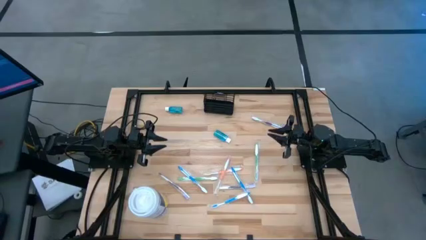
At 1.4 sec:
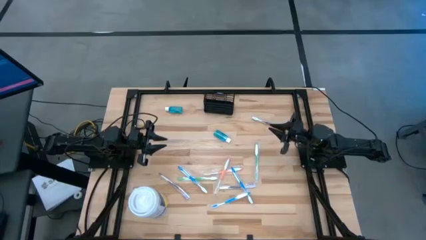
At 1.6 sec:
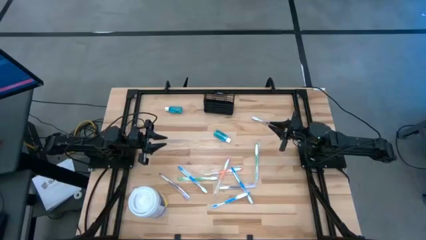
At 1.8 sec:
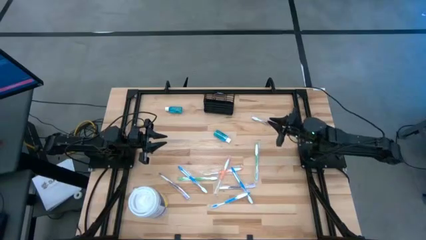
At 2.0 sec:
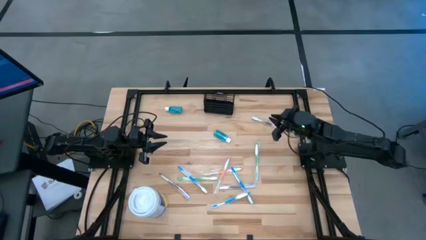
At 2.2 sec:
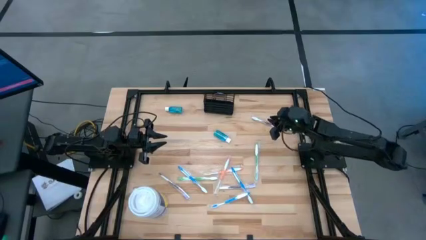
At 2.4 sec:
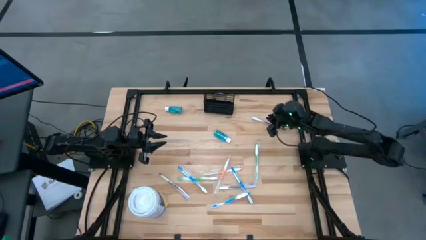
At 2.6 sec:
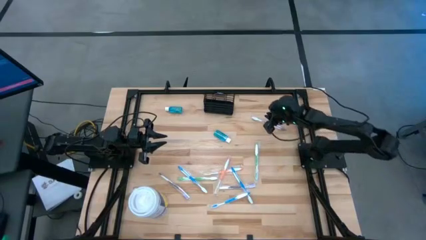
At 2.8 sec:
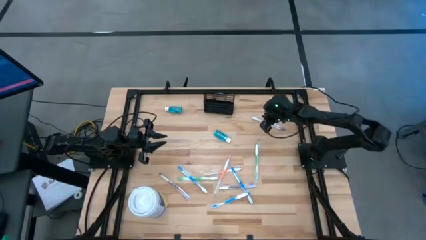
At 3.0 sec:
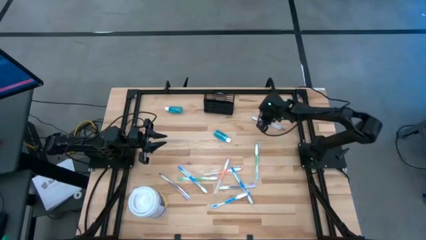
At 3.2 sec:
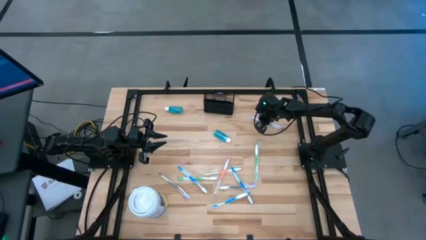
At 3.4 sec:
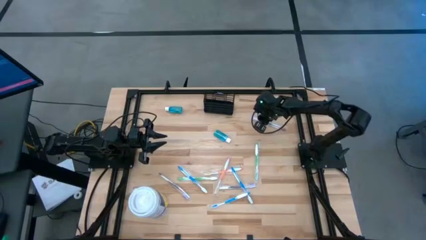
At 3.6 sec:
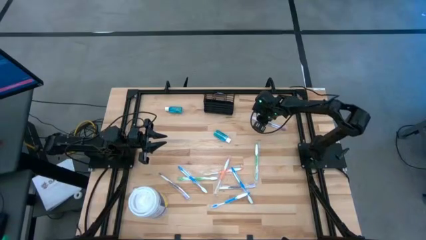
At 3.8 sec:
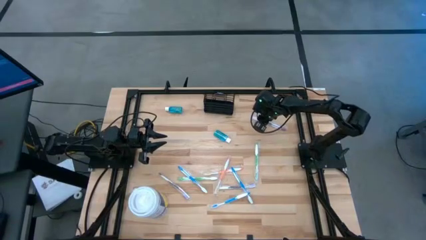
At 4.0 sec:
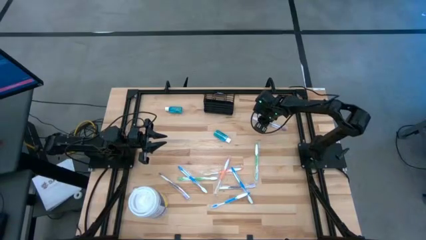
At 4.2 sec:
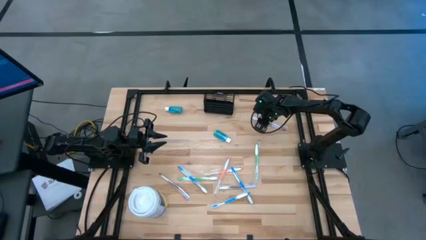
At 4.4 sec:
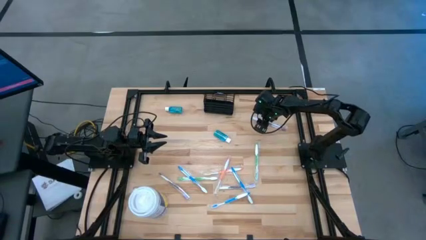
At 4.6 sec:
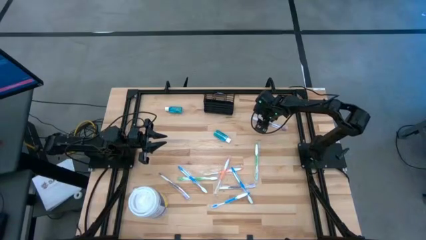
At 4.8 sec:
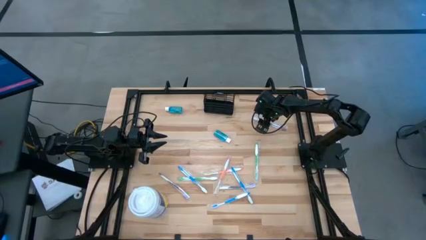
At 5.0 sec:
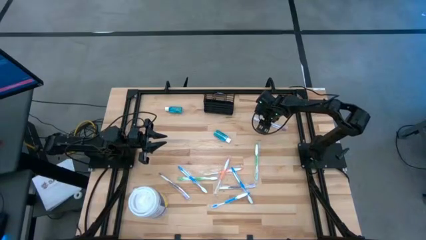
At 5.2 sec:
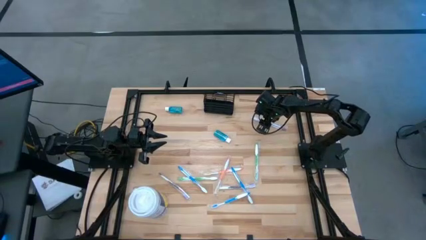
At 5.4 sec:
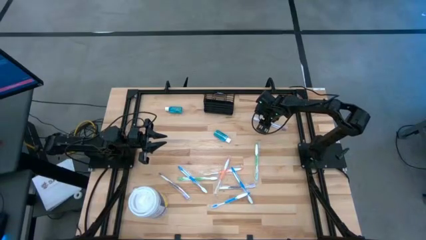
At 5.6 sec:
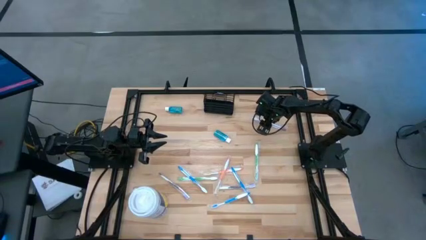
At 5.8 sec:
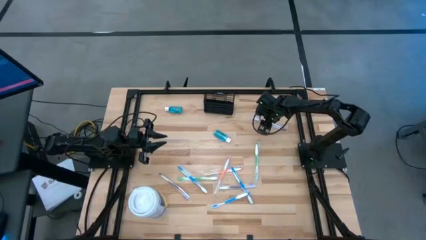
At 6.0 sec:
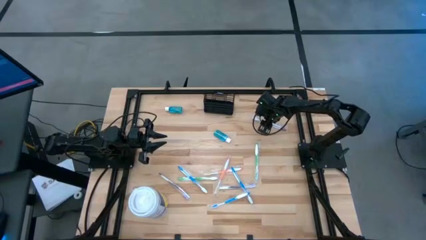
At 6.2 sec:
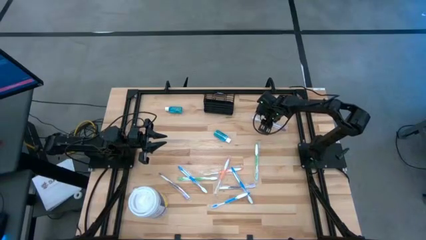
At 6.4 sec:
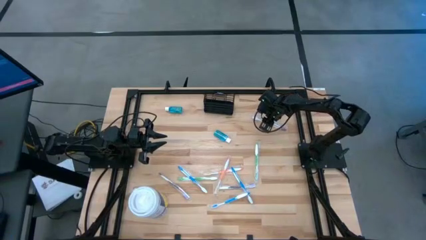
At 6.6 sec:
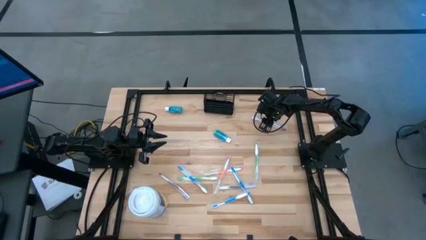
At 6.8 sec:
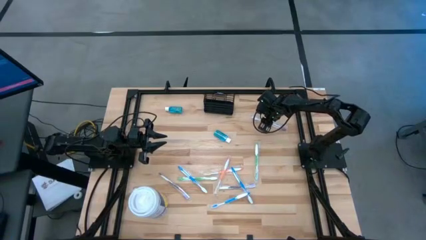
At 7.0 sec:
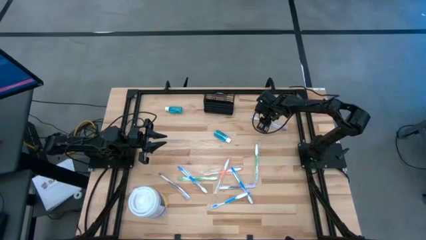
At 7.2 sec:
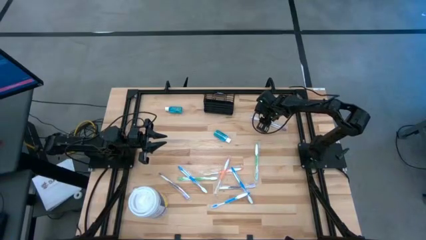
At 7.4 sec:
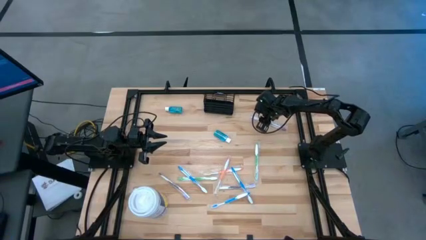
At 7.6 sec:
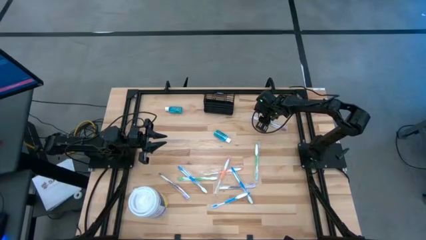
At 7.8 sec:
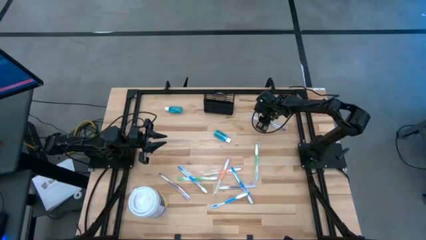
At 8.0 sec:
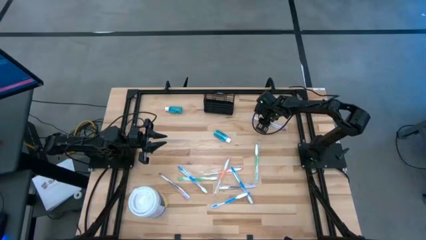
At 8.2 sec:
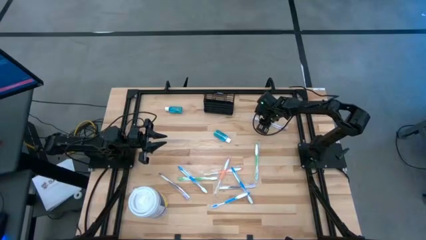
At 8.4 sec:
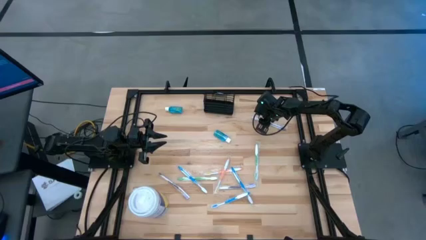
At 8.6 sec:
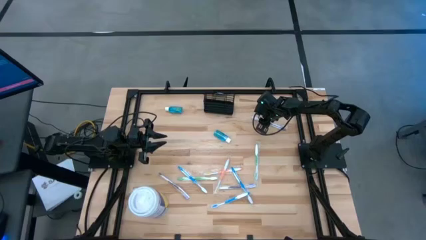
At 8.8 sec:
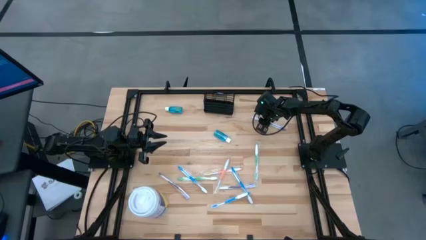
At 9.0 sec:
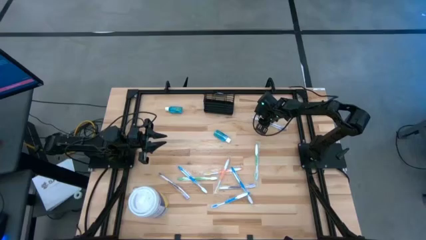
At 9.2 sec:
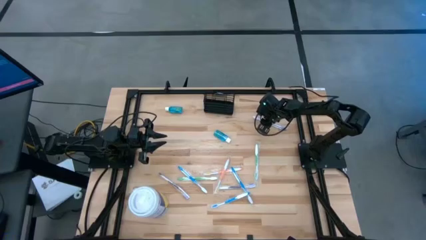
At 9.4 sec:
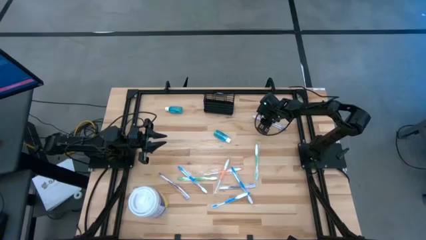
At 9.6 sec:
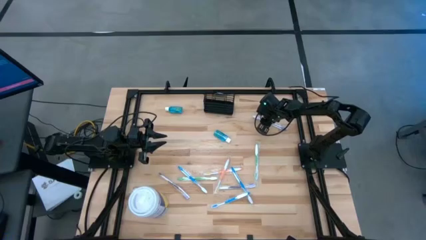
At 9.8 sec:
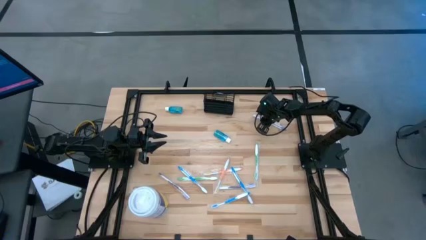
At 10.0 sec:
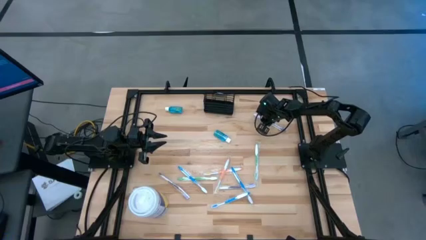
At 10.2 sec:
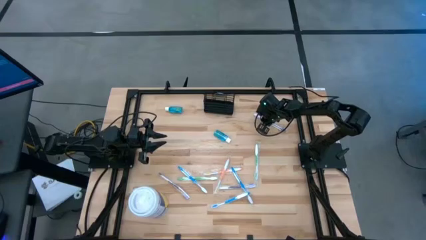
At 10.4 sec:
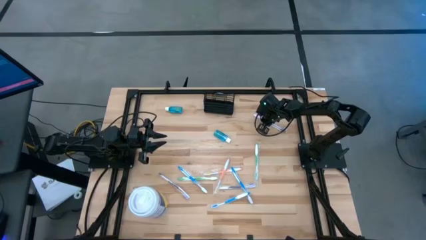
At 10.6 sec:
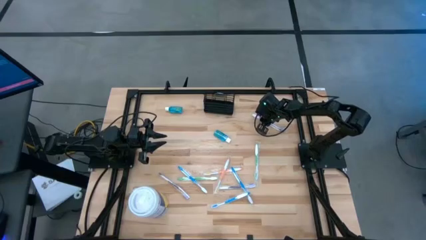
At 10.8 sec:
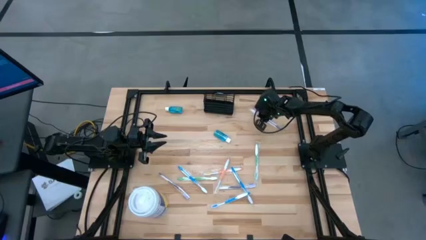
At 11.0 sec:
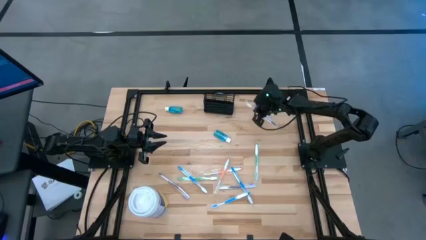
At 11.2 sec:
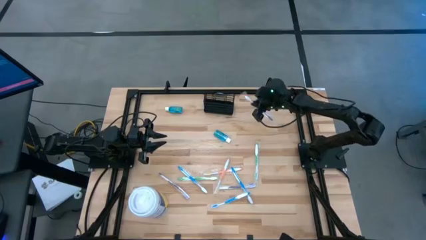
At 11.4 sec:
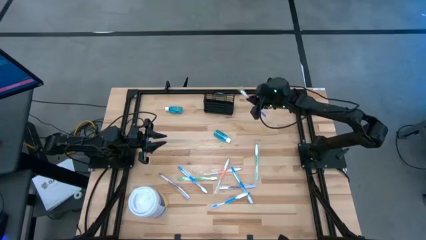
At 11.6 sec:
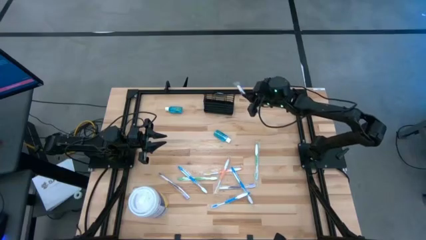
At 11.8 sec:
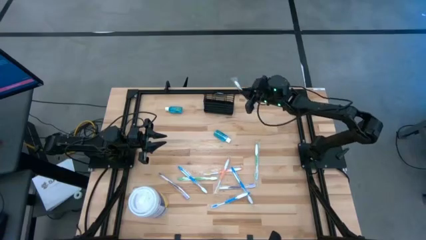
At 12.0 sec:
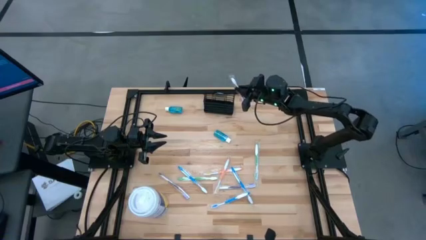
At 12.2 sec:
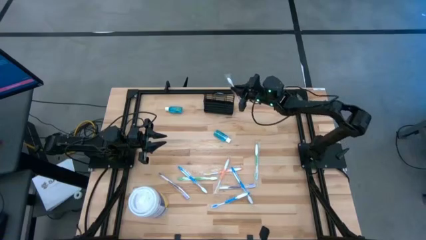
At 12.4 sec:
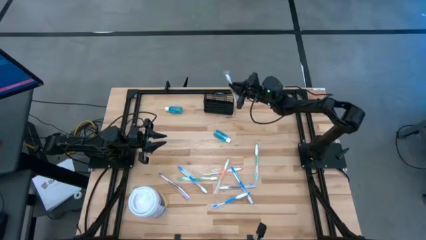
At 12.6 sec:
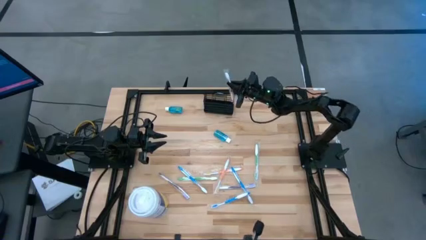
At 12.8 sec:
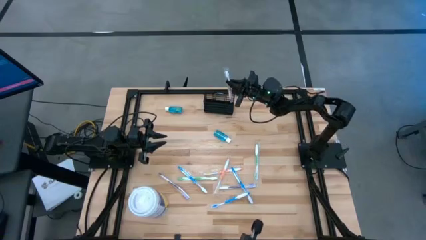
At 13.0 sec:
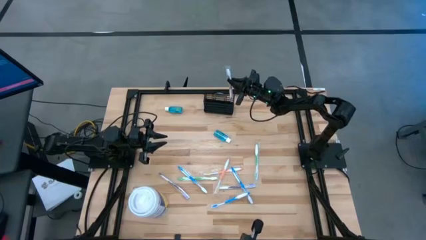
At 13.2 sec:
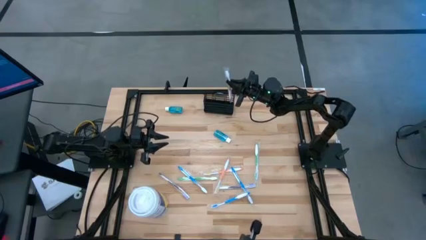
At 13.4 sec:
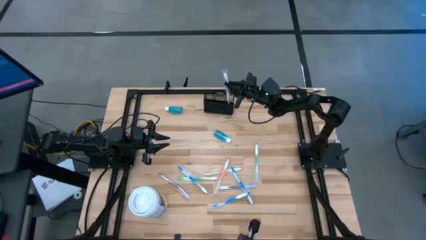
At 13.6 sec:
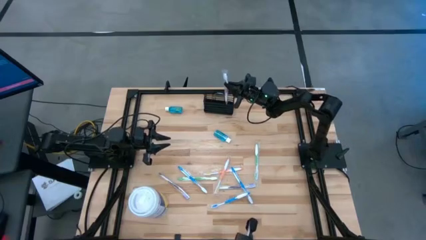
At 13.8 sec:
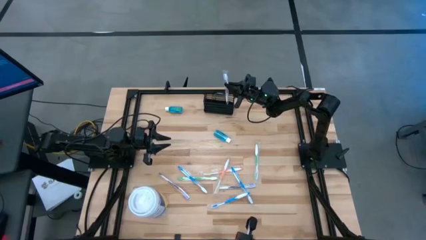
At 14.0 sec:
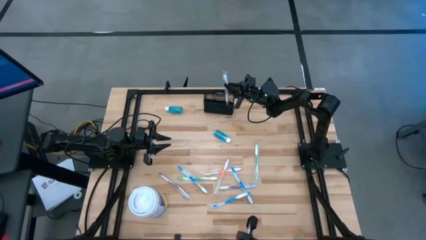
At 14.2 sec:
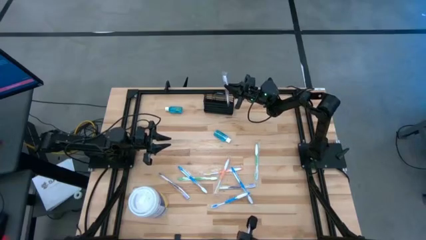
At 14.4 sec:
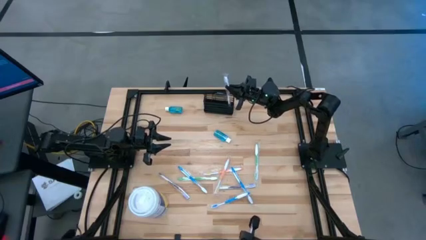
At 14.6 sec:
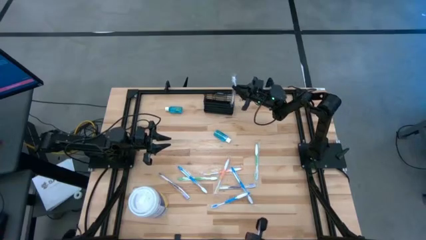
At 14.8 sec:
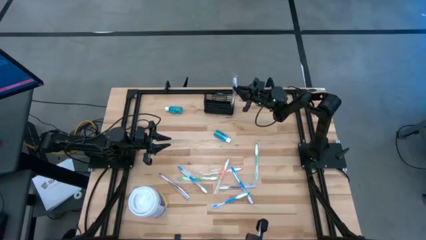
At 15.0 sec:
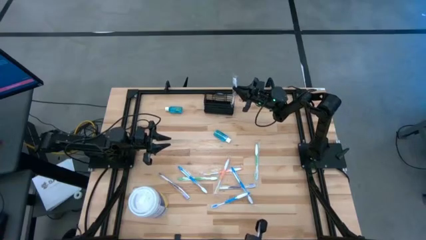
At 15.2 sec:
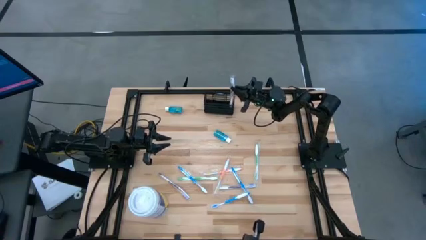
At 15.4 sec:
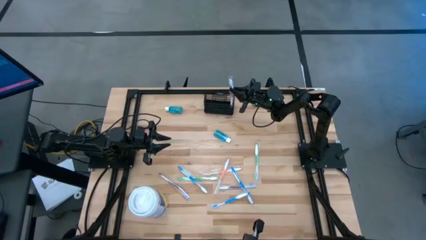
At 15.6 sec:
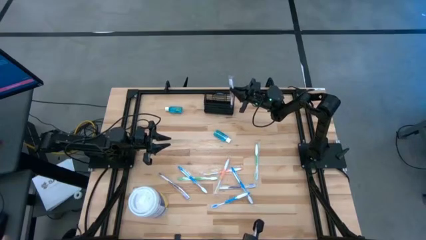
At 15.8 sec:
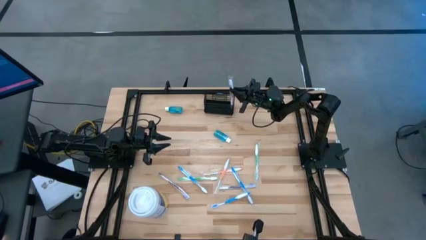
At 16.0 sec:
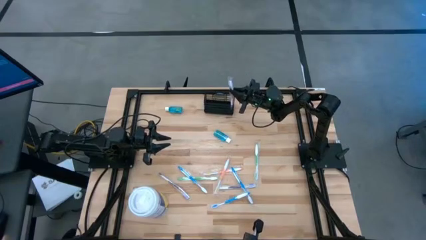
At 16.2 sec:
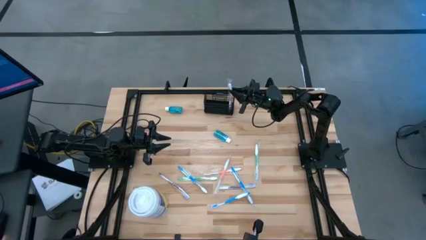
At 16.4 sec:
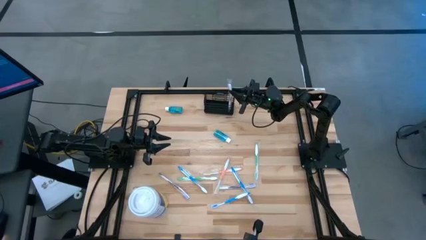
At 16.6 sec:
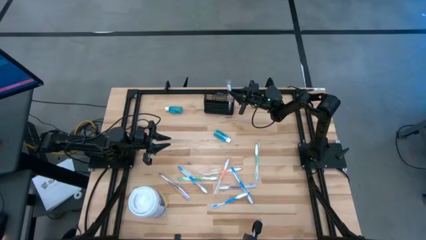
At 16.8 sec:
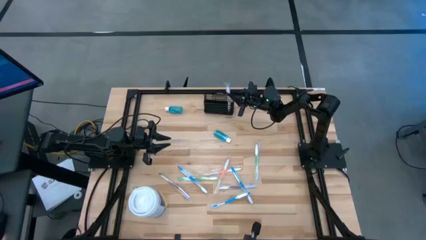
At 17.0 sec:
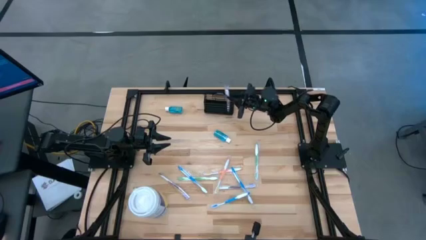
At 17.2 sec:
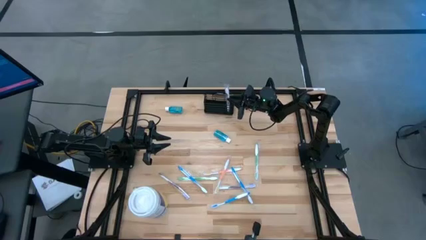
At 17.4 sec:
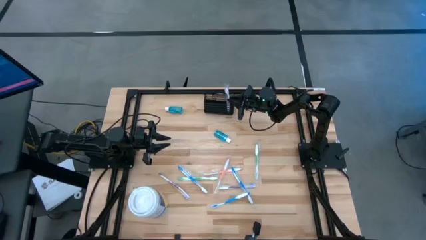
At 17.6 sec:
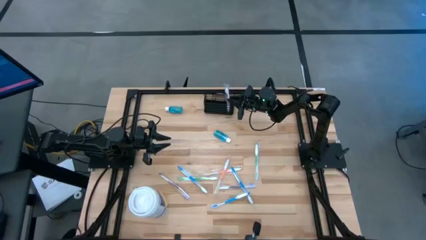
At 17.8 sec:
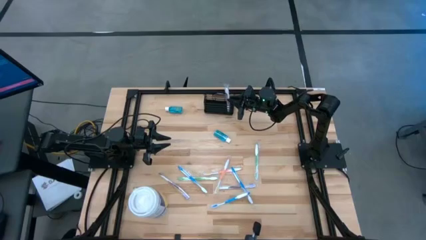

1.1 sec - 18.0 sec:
Task: Pick & Place toothbrushing station
Put the purple toothbrush into the mesh organizer
